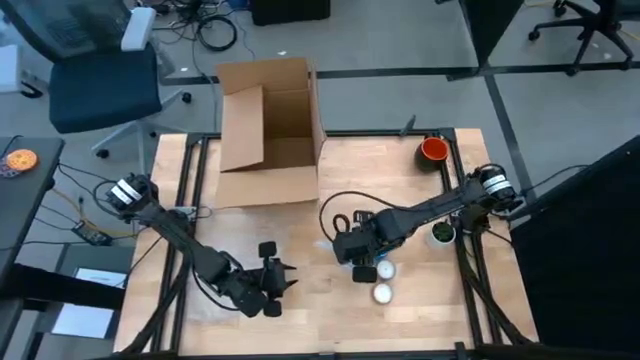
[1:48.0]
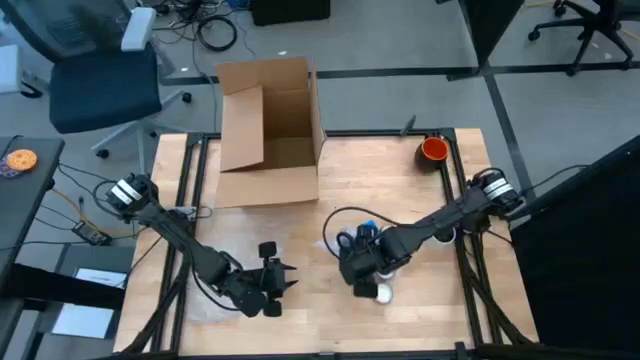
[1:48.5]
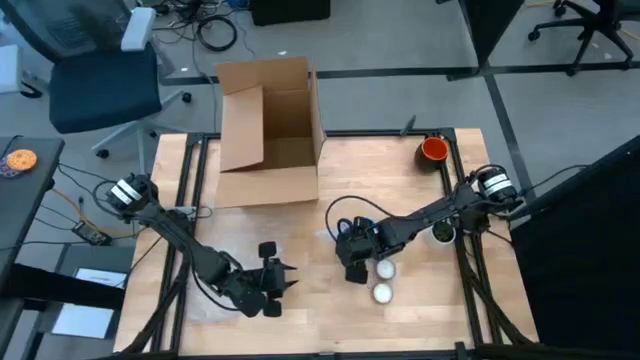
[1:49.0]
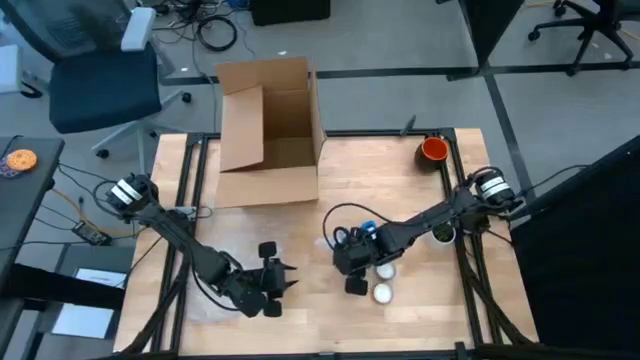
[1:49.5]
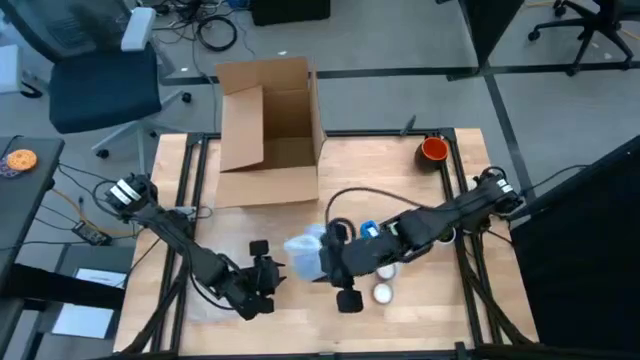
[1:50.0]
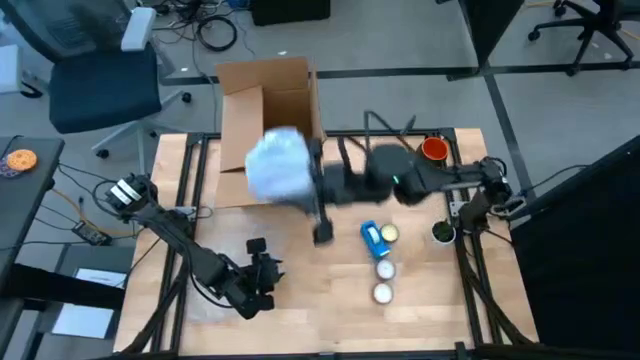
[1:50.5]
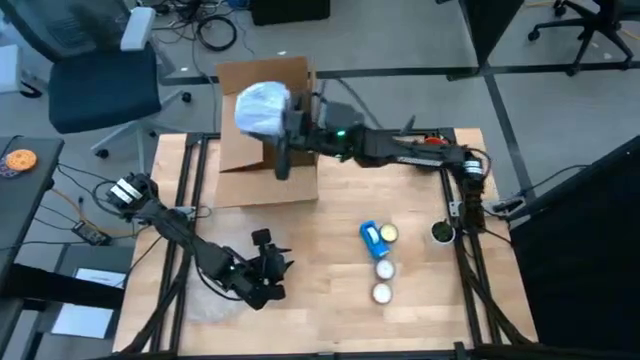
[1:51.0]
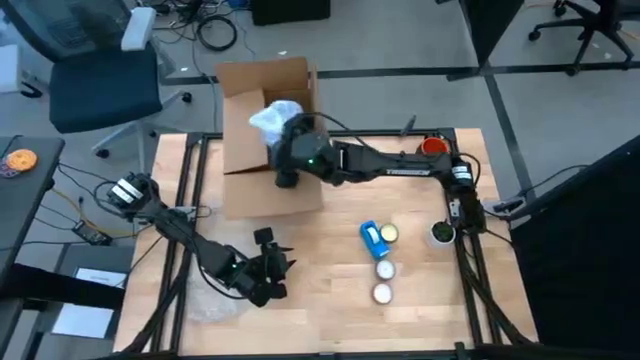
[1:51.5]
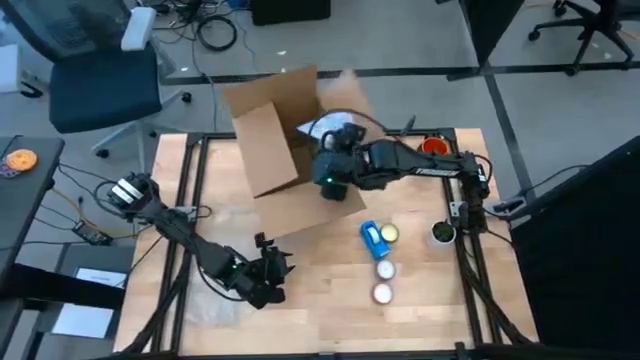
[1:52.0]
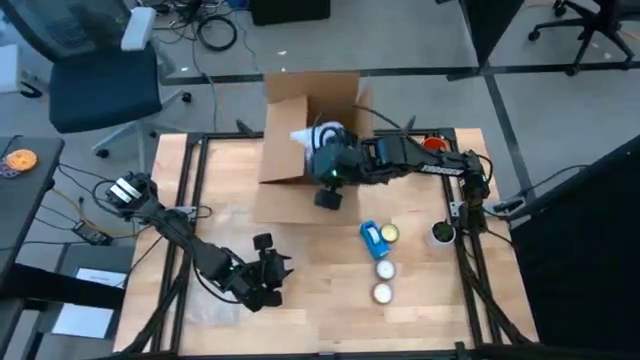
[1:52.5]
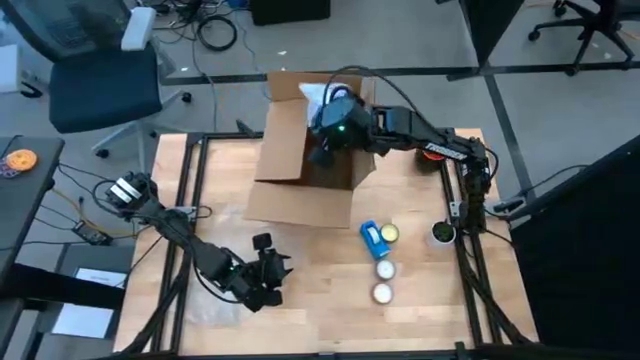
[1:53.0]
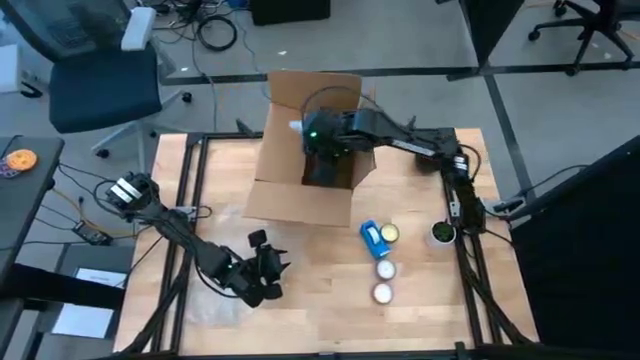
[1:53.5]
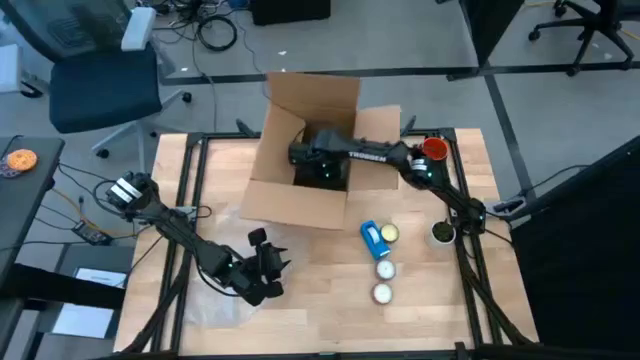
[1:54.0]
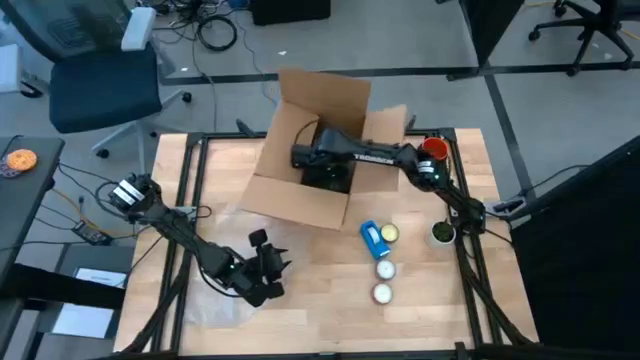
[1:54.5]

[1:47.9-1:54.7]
Task: wrap mug
Put the wrap mug into the box

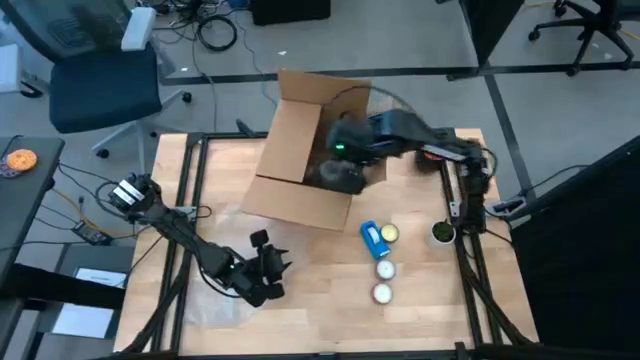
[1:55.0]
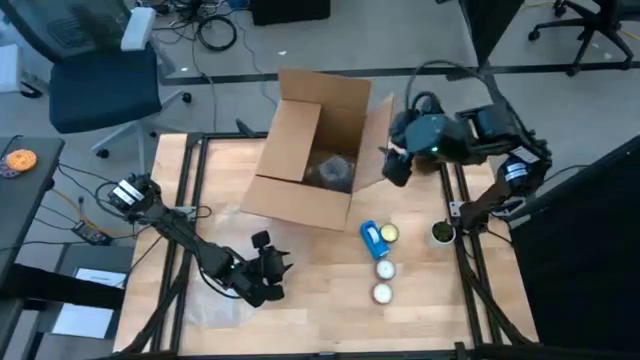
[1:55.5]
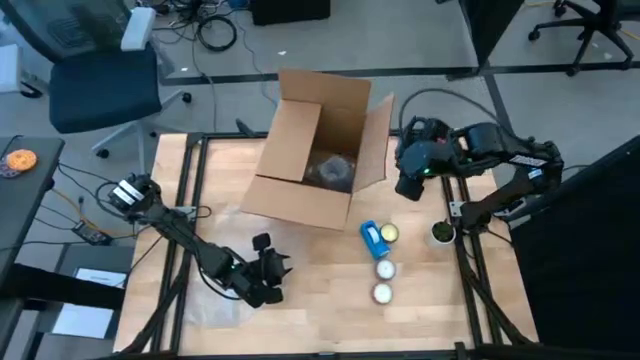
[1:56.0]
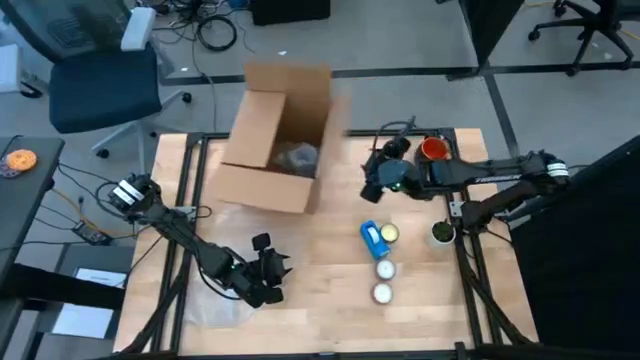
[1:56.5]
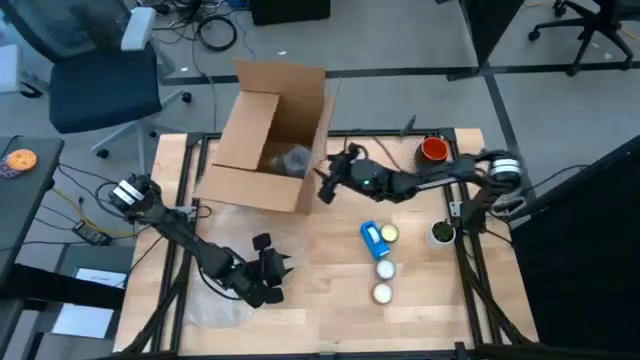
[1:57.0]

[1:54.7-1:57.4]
Move the box to the top left

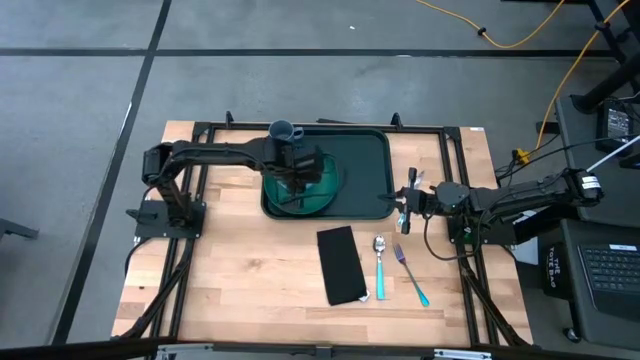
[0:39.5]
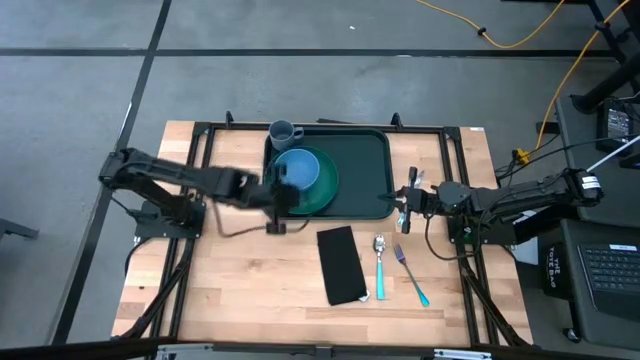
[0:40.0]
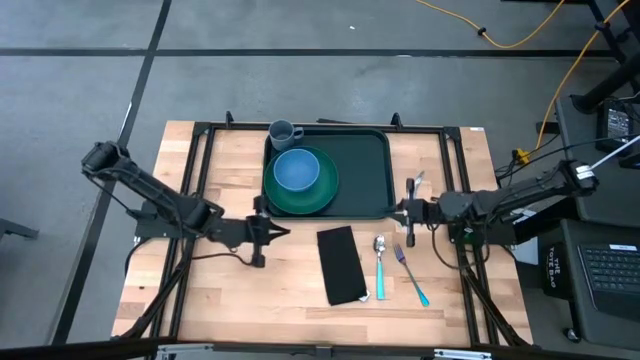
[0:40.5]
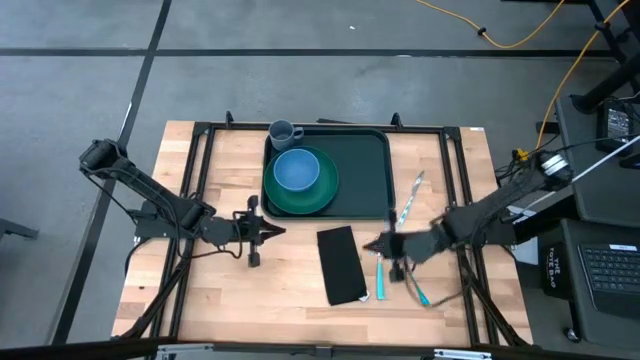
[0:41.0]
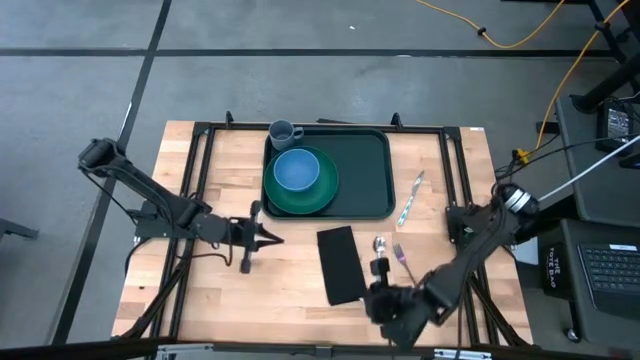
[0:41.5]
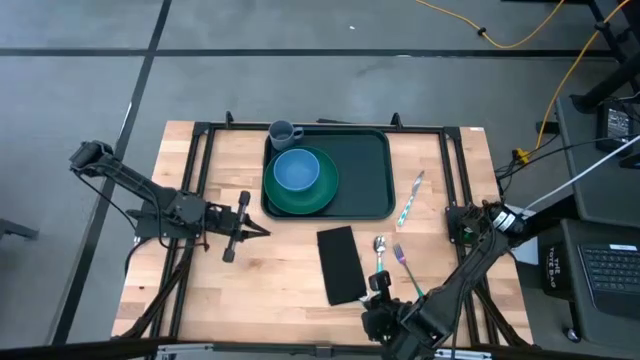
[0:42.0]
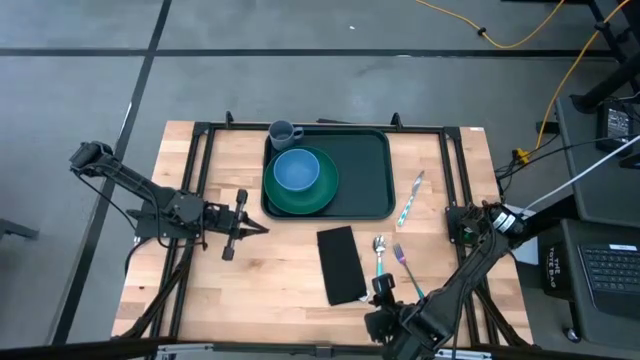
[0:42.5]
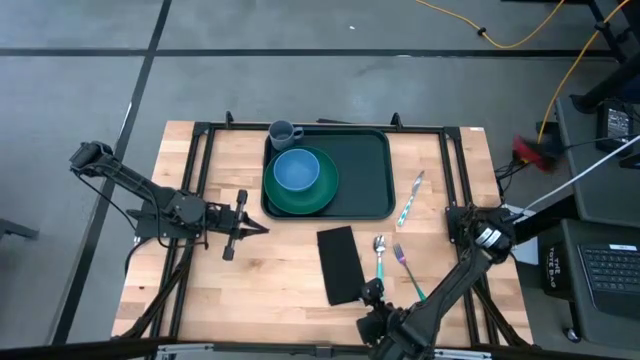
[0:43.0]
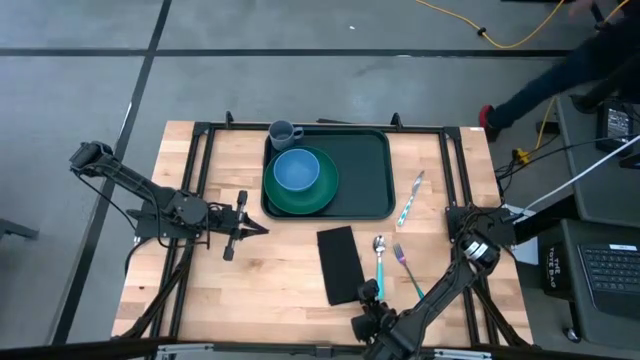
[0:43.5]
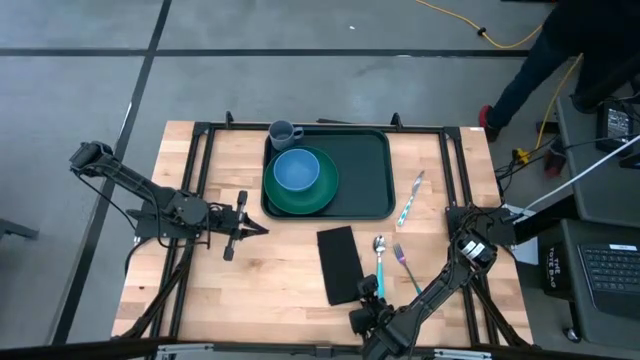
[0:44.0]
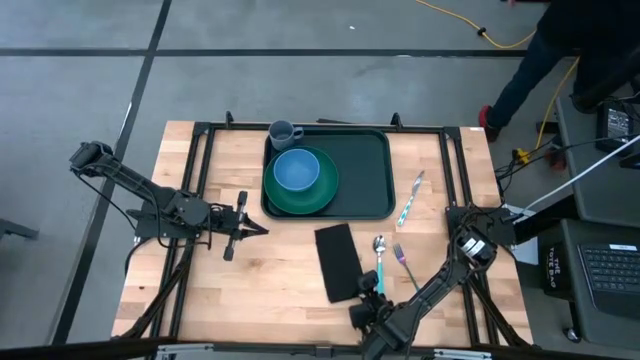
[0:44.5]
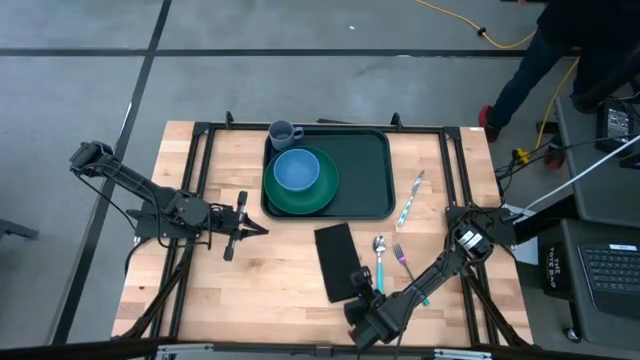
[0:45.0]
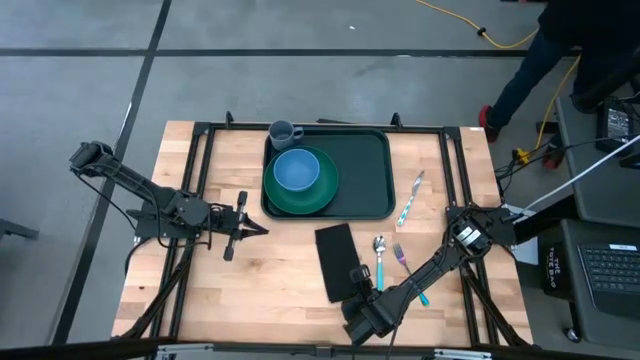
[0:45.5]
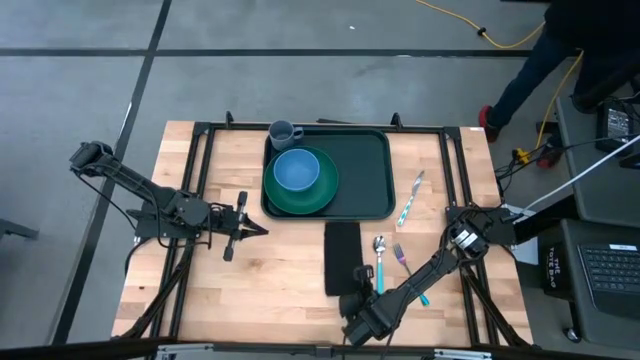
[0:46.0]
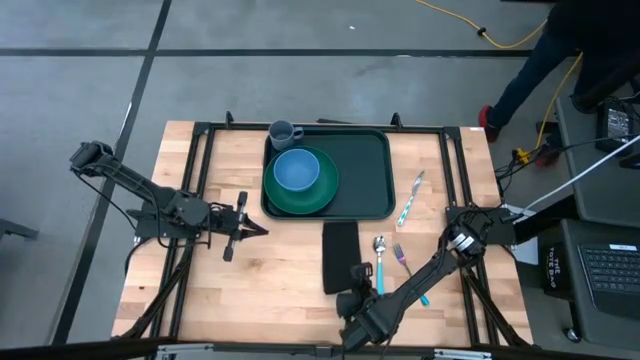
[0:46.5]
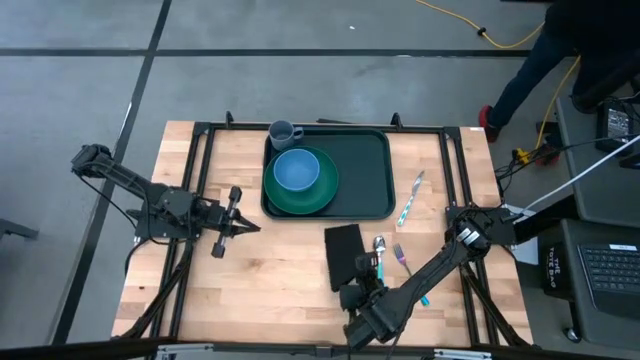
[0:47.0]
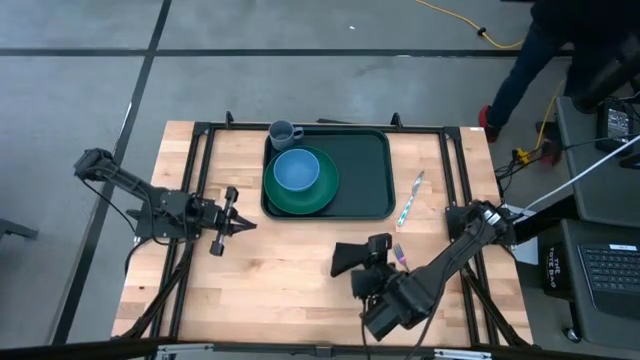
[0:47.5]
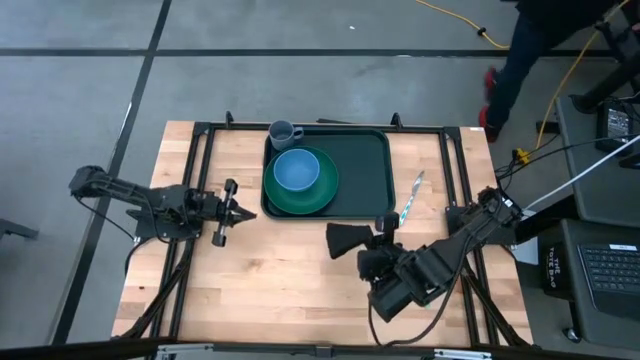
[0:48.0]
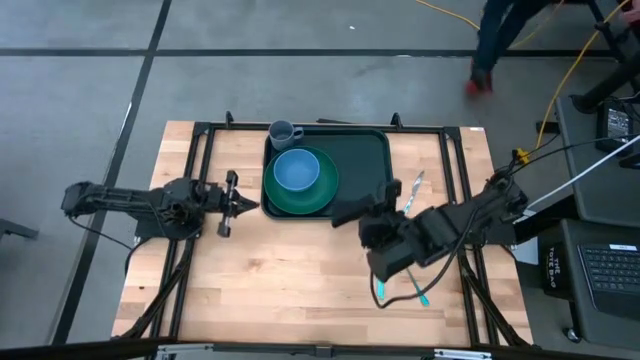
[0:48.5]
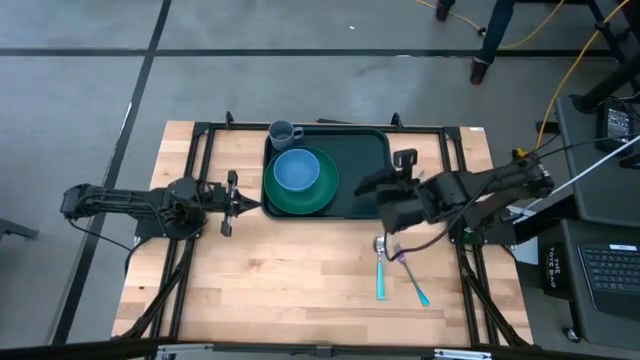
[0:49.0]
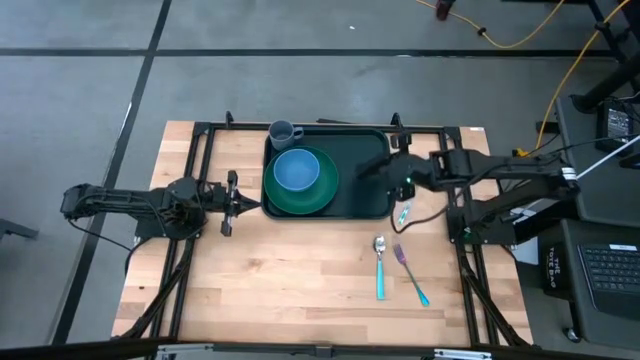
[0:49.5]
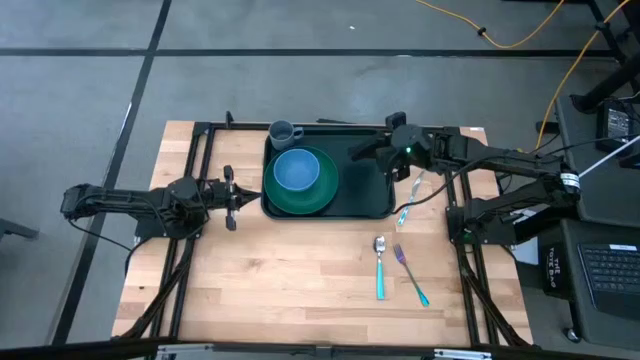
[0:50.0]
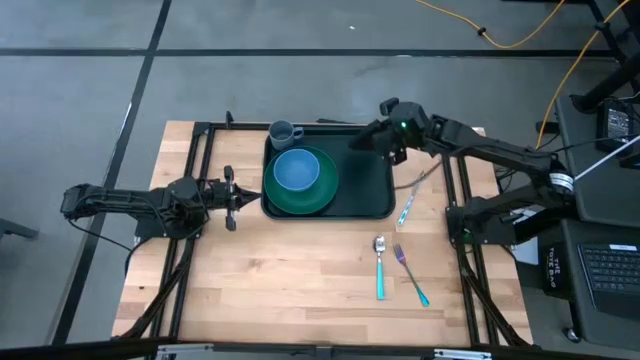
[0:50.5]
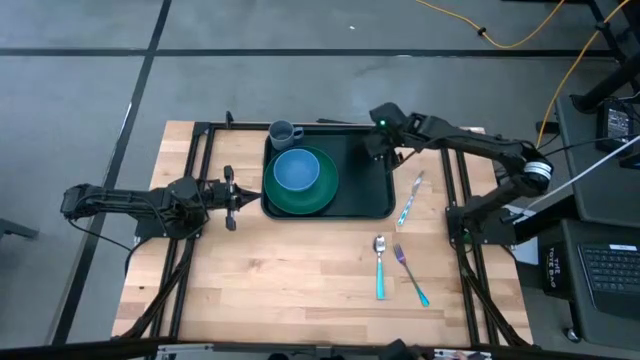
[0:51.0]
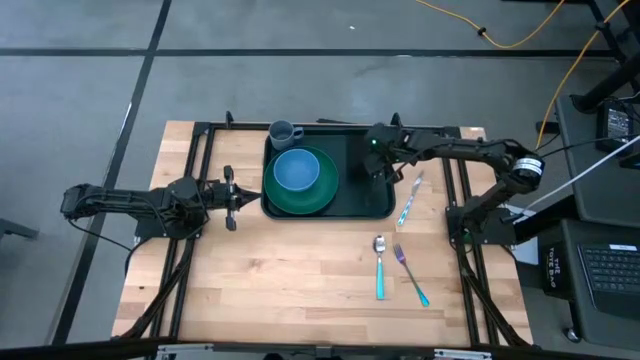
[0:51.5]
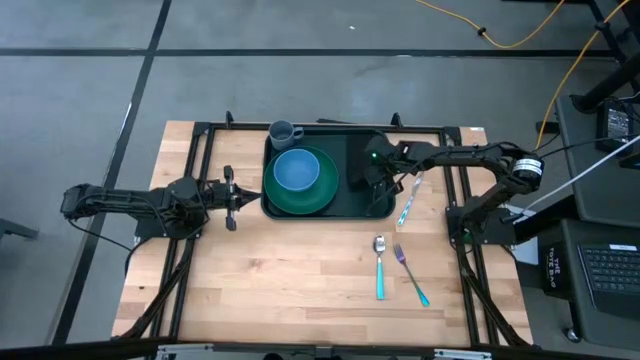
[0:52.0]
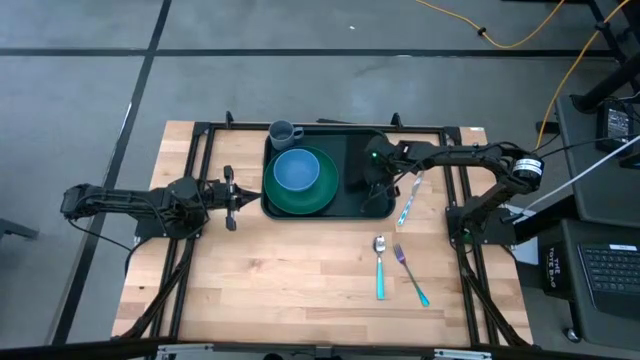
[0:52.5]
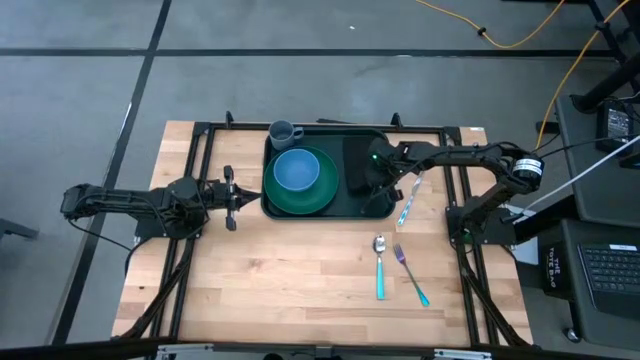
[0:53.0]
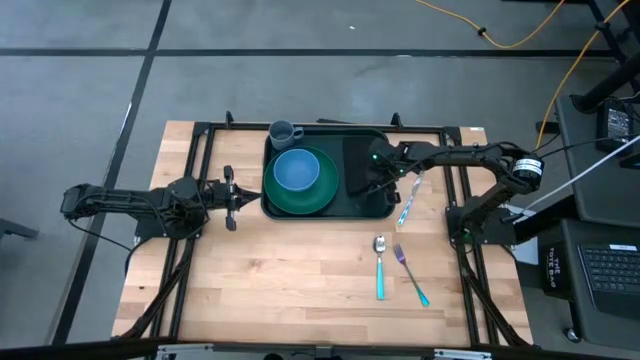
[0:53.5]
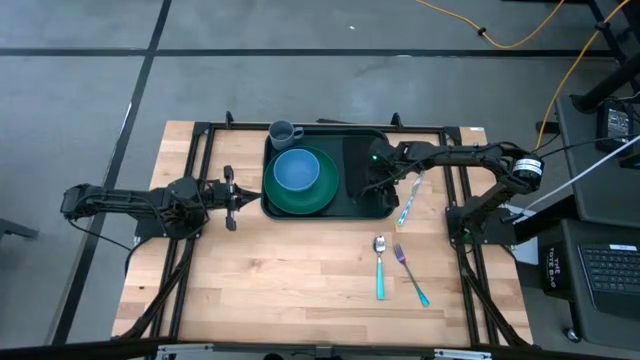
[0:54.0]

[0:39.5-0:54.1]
Task: Set up tray
Put the black napkin on the green serving tray to the right of the green plate
